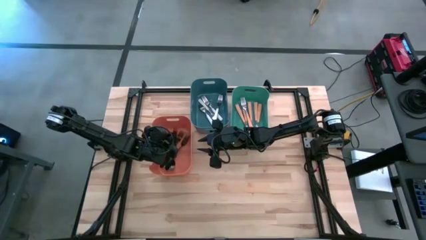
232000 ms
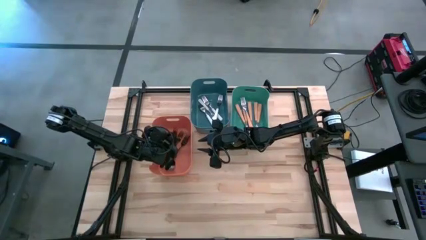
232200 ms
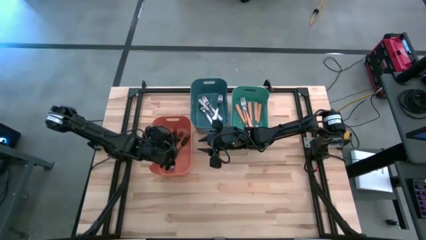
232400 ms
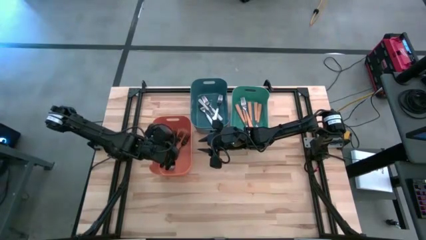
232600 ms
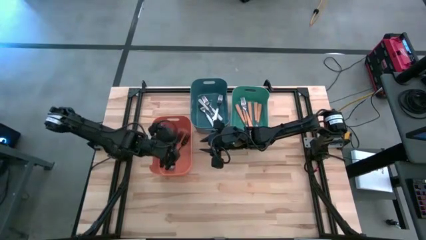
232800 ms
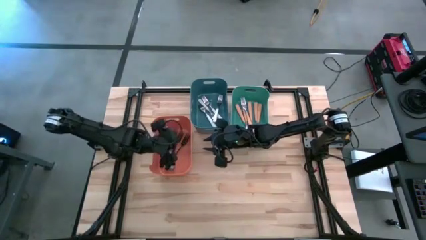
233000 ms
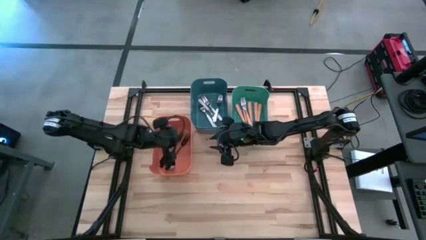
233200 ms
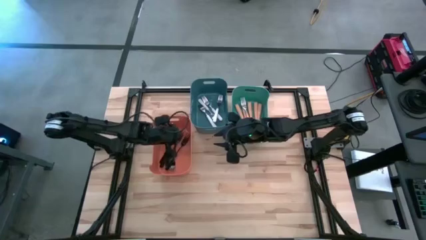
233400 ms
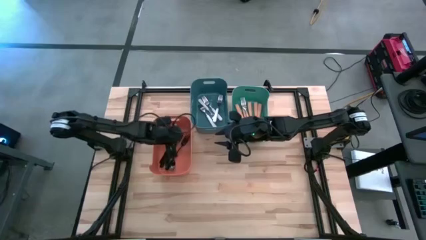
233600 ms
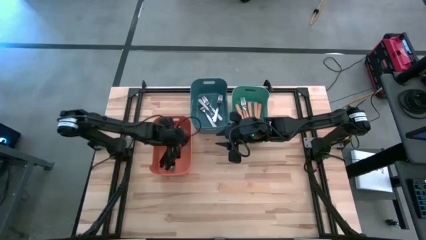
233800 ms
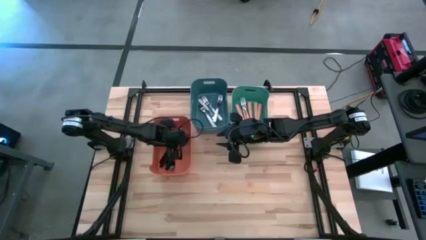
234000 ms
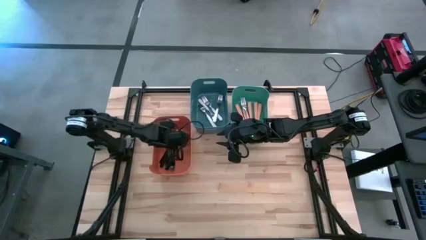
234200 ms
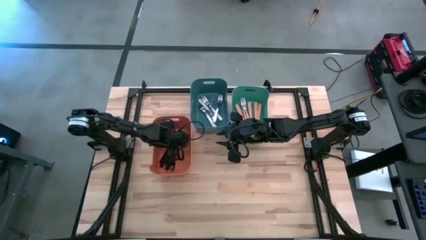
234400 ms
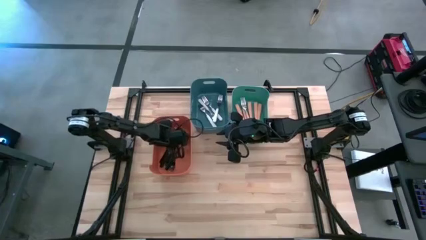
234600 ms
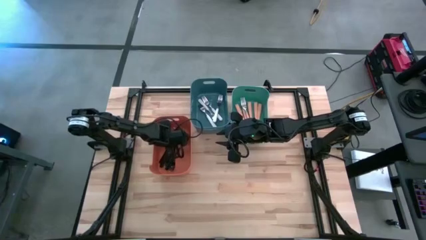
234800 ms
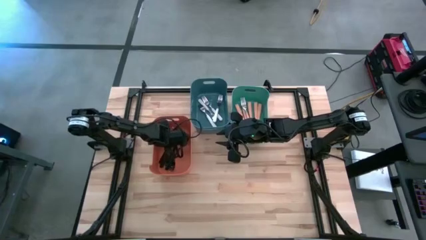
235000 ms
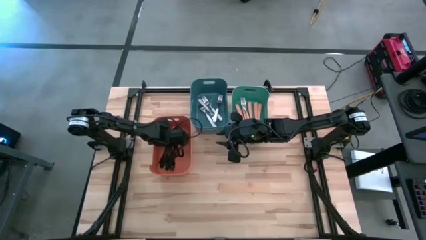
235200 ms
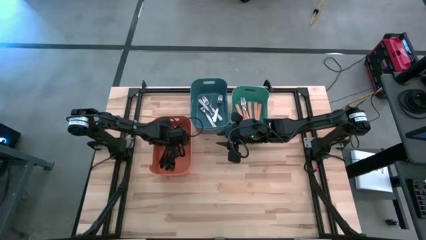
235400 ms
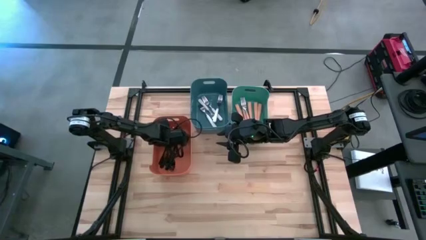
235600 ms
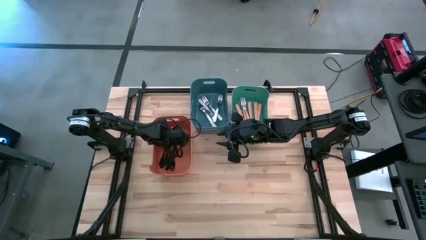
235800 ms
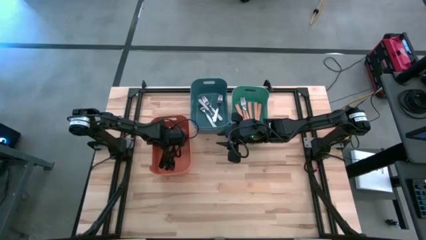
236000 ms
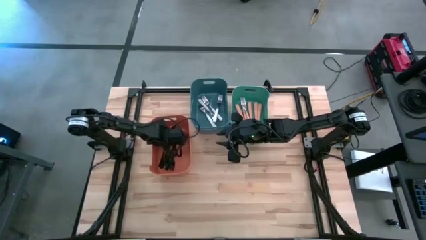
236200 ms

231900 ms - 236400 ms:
Task: Sort silverware by color (type)
Adjust the black forks in the orange bin

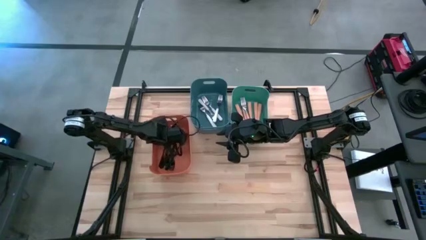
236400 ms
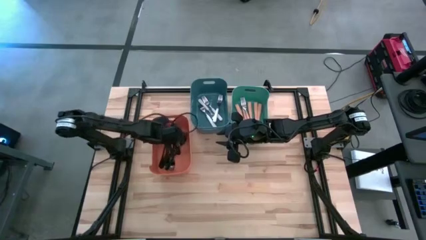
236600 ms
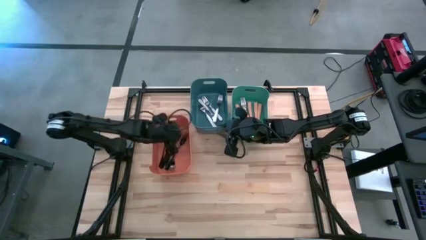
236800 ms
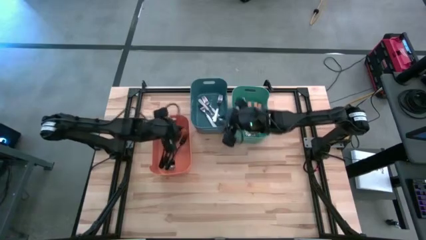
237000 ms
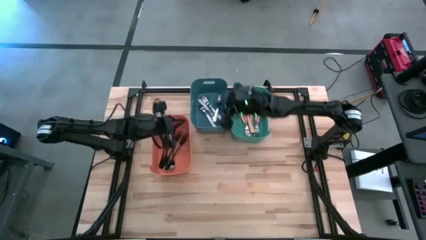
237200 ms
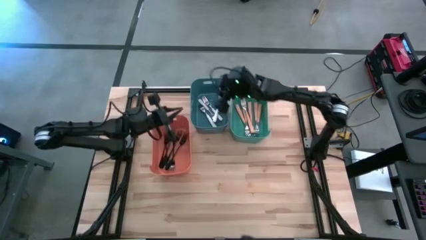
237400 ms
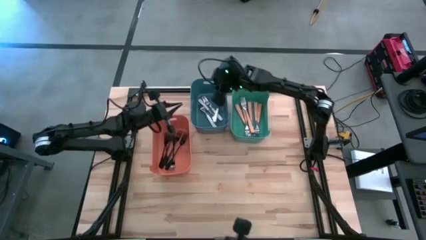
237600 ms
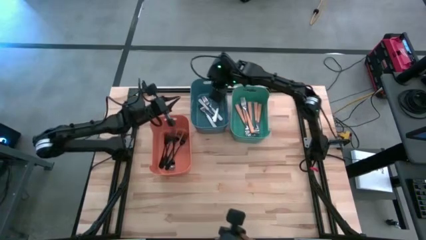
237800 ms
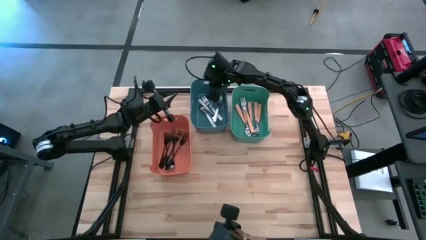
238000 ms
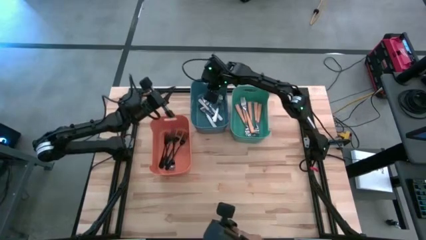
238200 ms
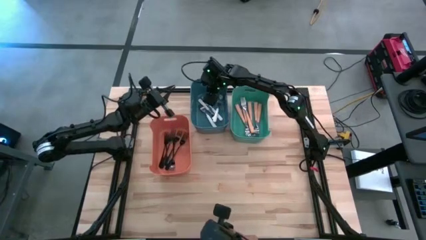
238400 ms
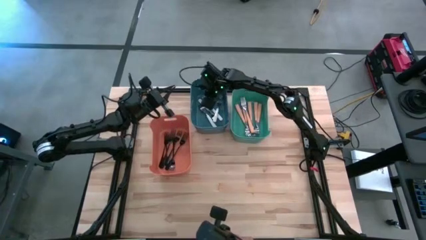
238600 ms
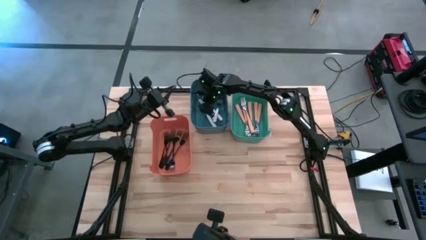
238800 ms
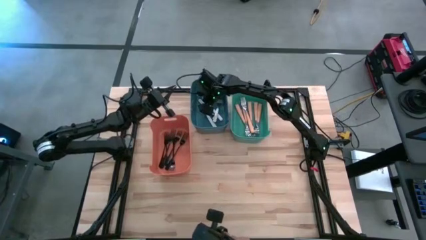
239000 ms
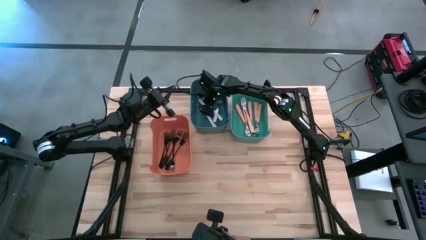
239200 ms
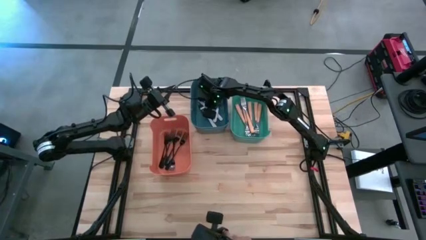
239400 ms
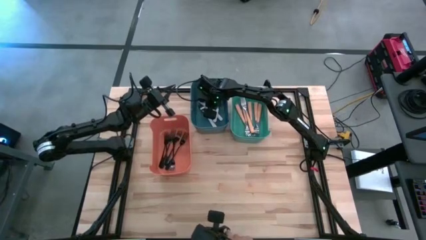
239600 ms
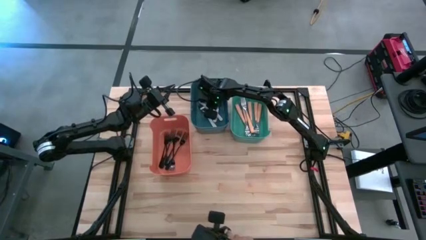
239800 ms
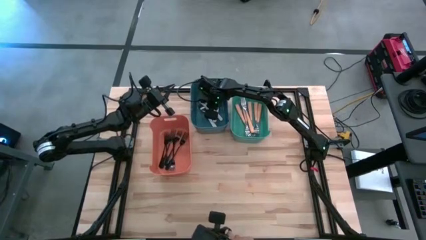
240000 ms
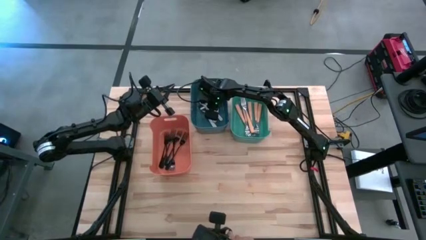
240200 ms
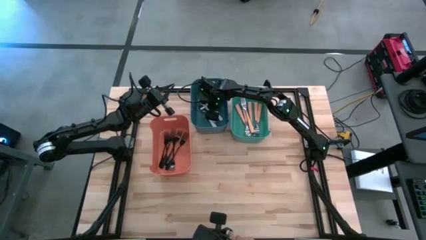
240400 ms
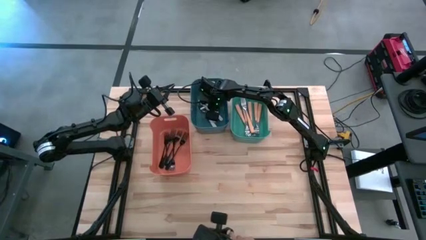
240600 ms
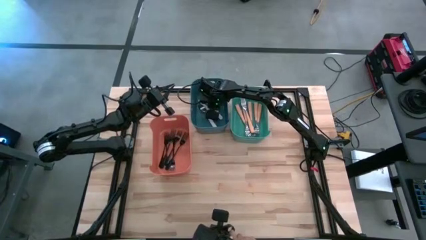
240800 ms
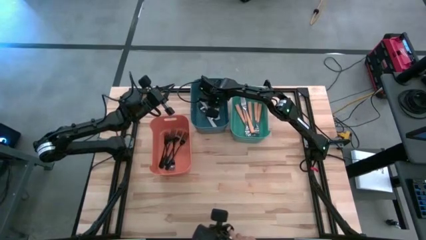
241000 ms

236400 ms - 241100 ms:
Adjust the white forks in the blue bin

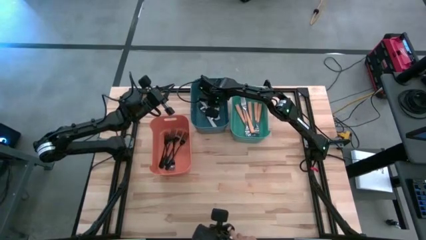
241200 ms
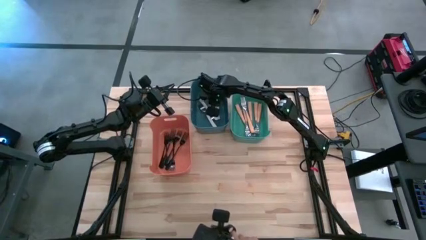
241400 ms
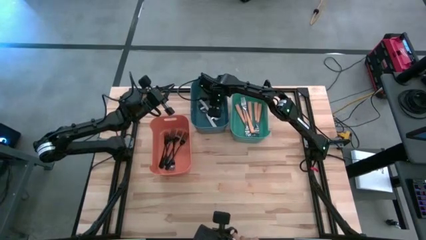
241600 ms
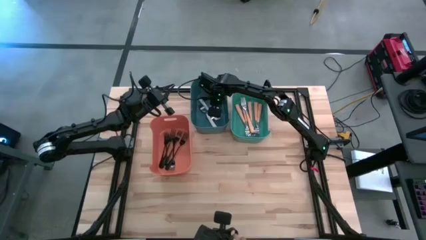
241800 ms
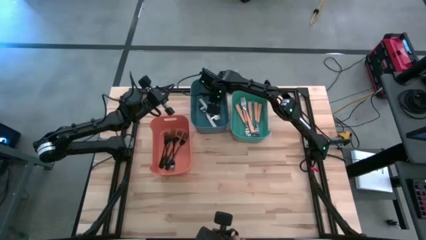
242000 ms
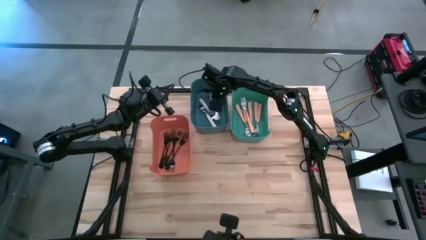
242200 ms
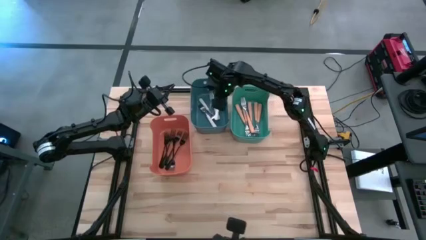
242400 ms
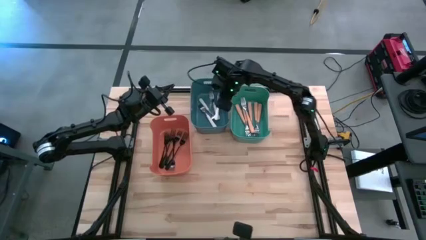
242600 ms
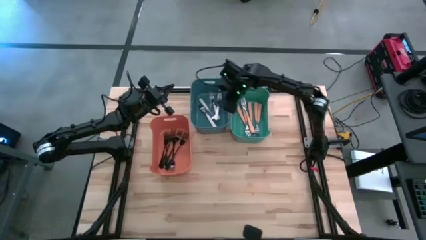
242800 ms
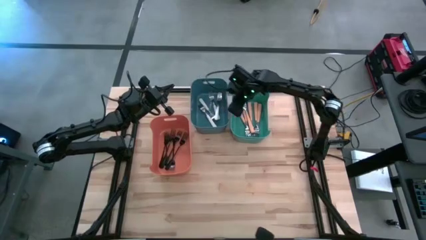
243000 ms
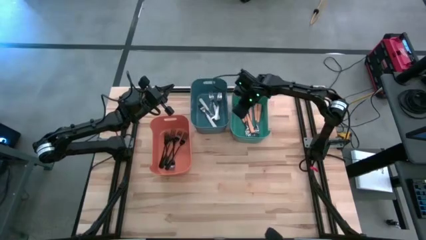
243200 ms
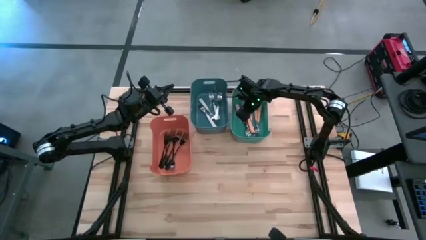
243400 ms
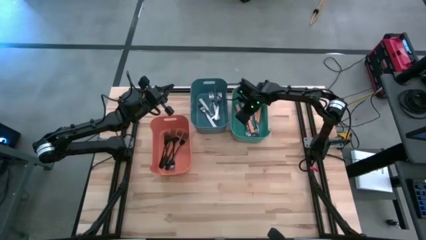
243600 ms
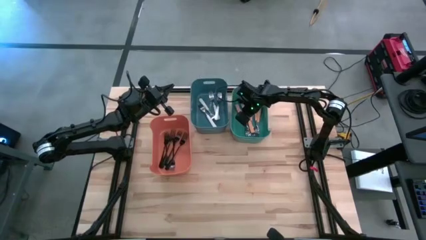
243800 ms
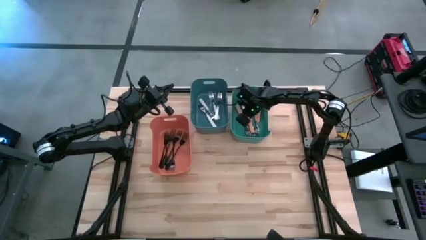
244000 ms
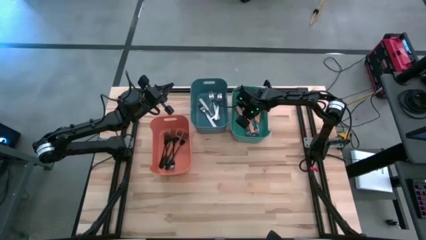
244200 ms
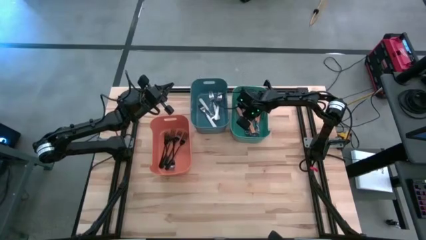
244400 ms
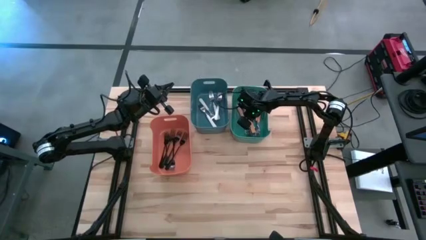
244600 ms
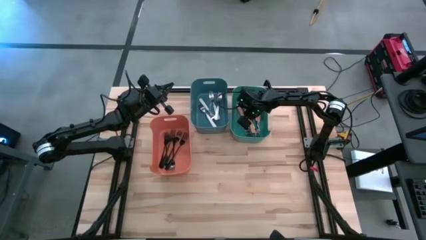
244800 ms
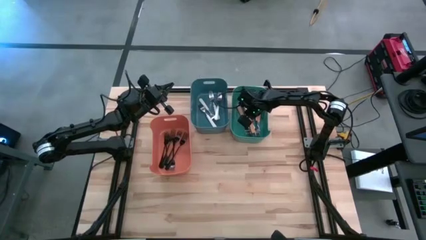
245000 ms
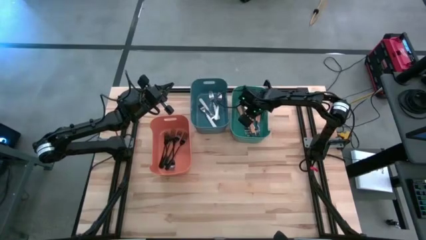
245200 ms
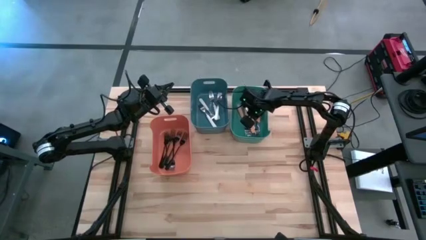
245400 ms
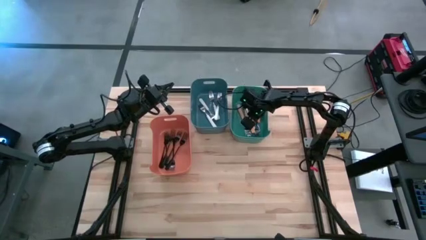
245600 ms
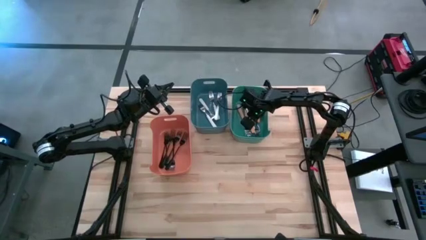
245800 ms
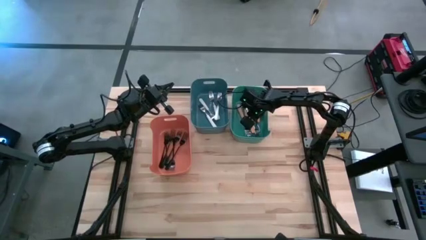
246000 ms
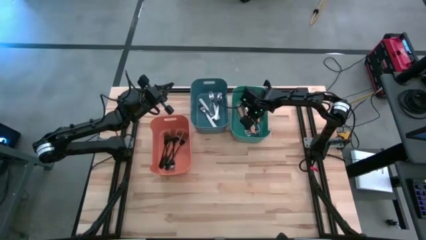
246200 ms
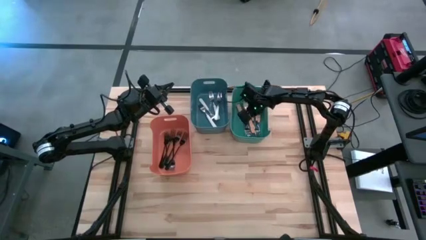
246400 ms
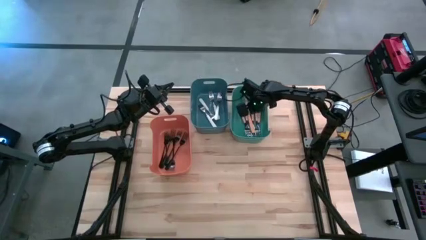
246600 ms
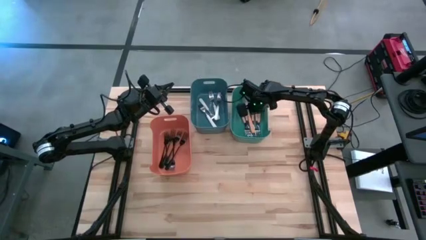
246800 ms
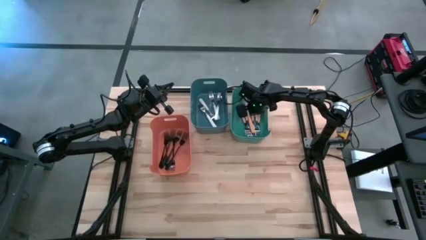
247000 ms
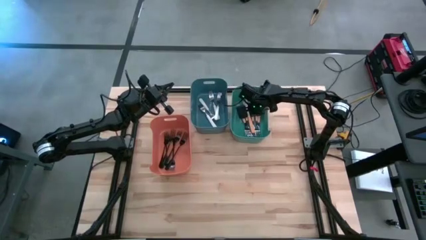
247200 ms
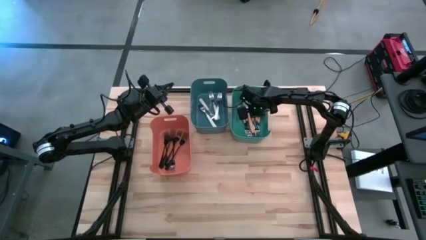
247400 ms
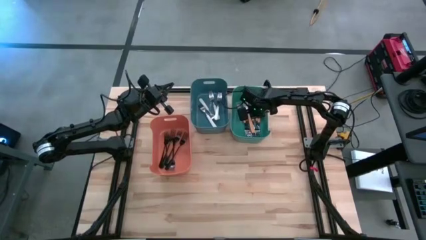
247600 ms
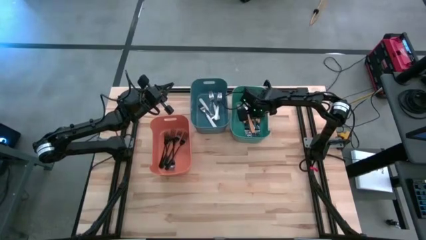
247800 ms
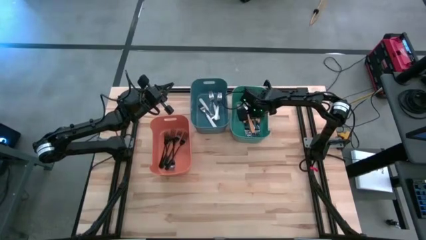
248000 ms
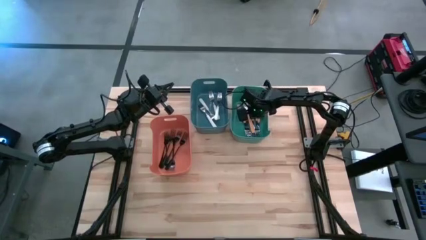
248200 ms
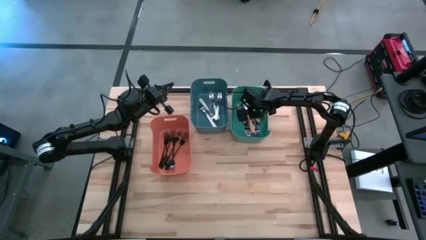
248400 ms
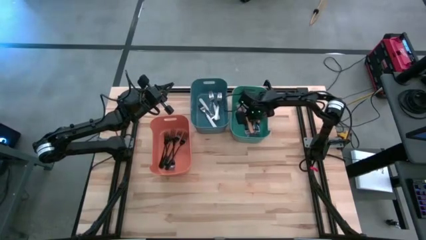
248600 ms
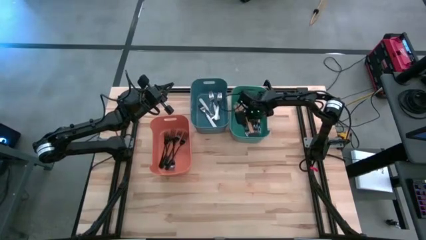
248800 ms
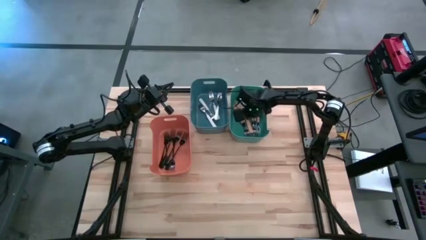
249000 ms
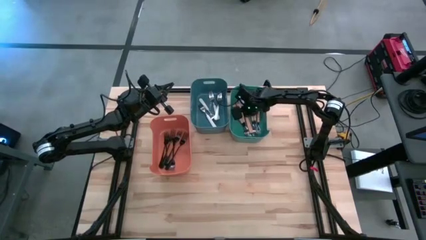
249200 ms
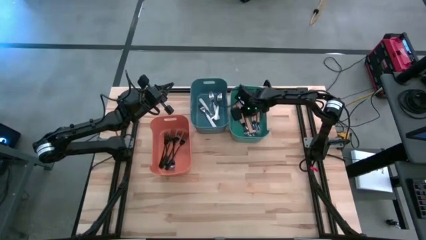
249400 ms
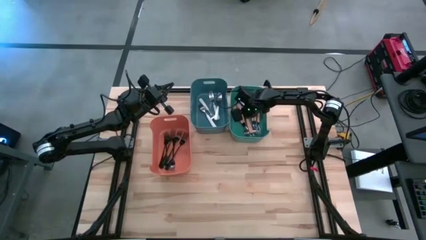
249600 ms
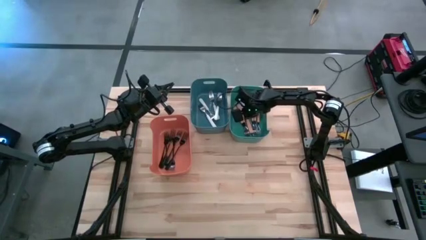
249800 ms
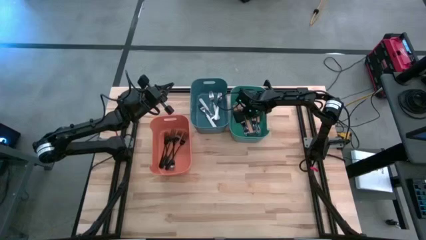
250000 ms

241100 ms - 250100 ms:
Adjust the orange forks in the green bin
